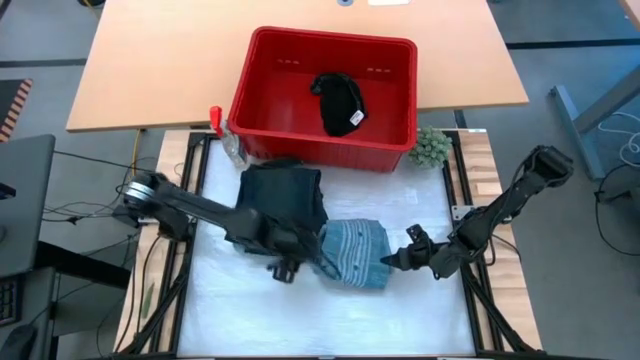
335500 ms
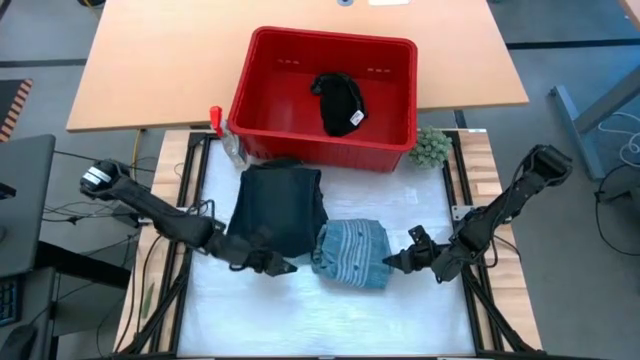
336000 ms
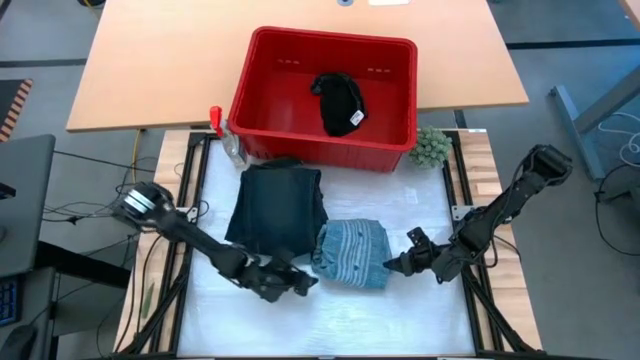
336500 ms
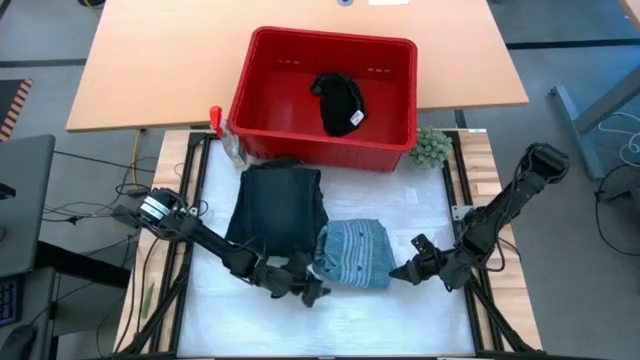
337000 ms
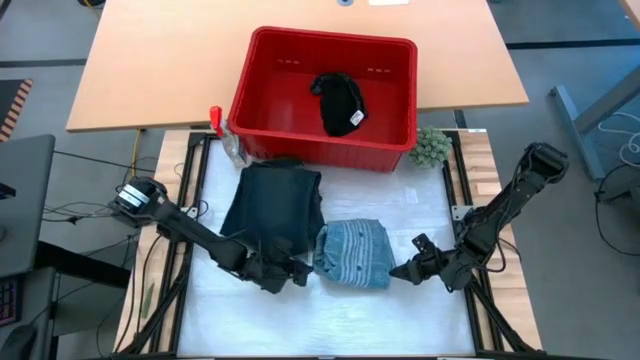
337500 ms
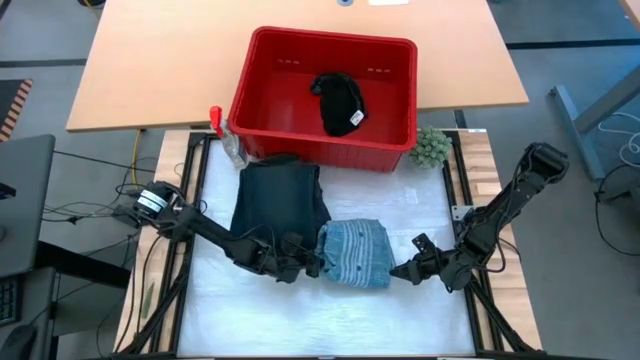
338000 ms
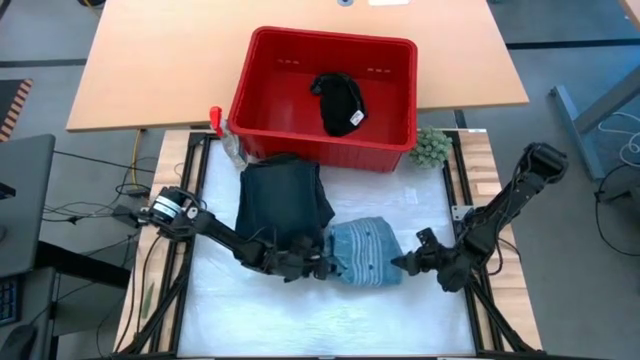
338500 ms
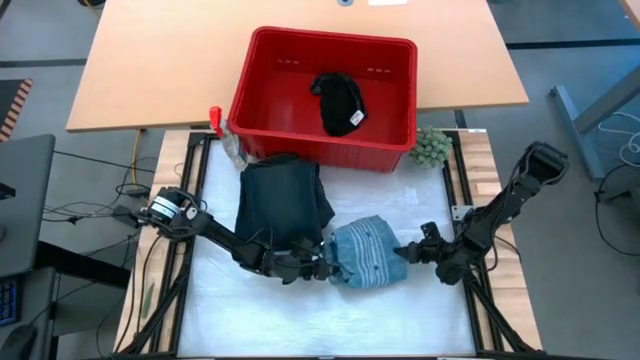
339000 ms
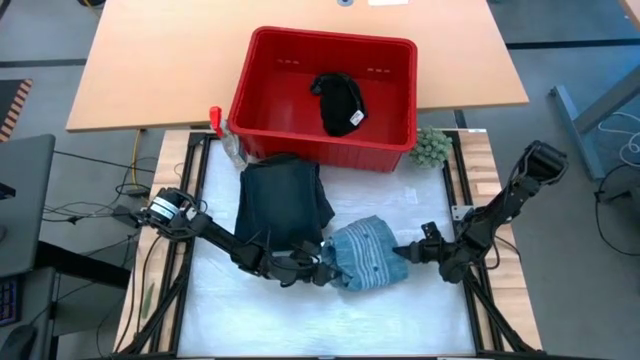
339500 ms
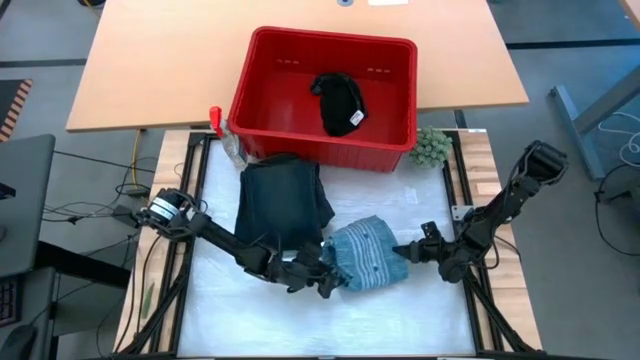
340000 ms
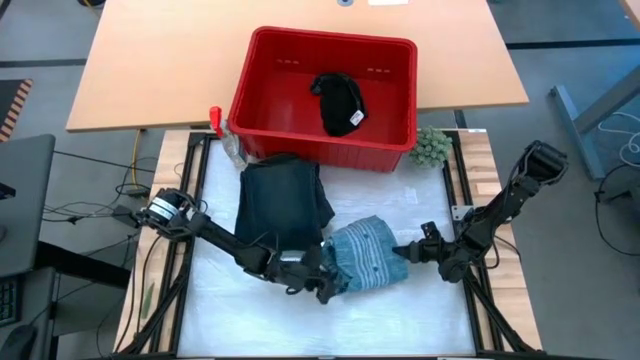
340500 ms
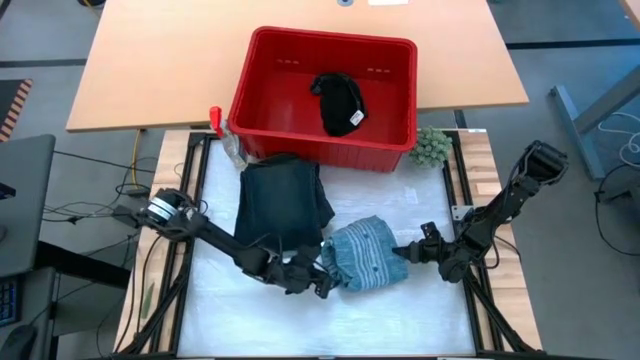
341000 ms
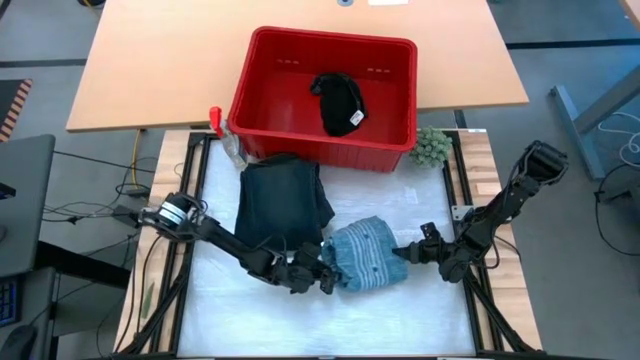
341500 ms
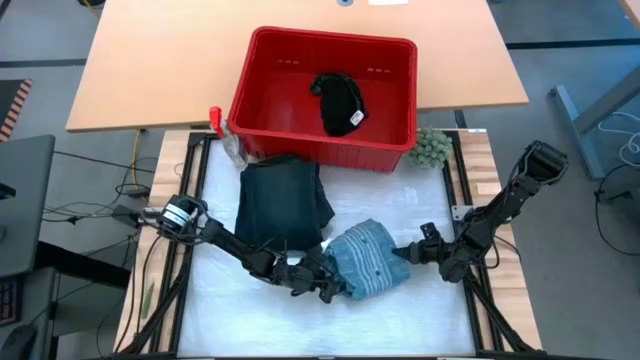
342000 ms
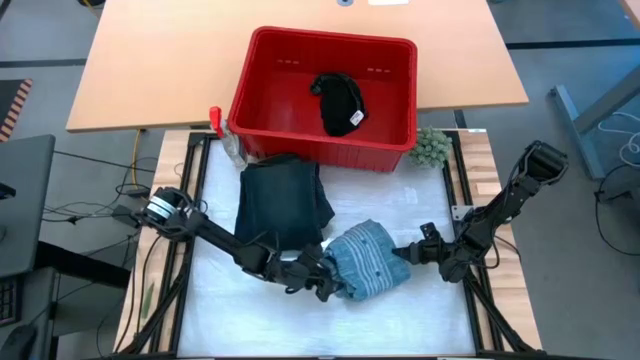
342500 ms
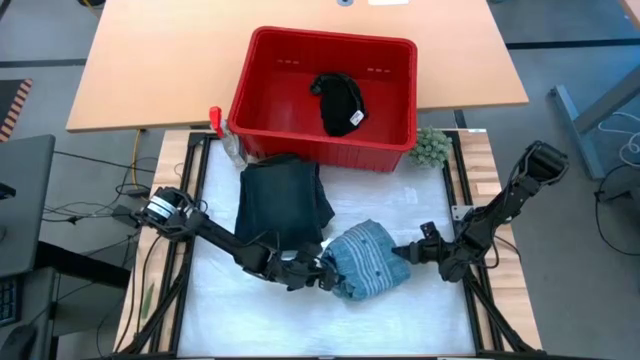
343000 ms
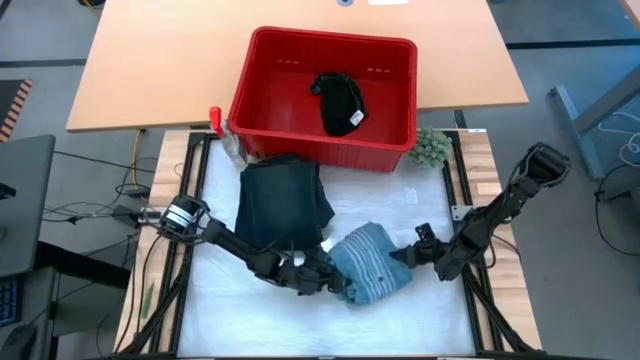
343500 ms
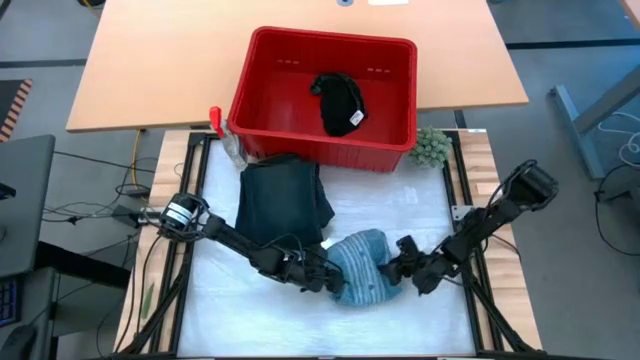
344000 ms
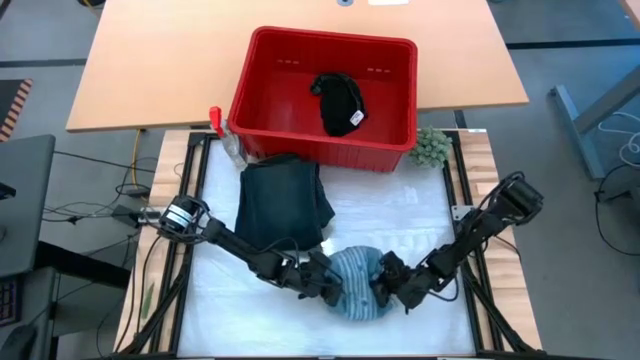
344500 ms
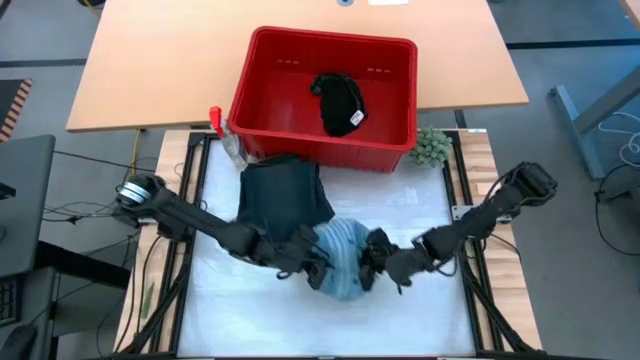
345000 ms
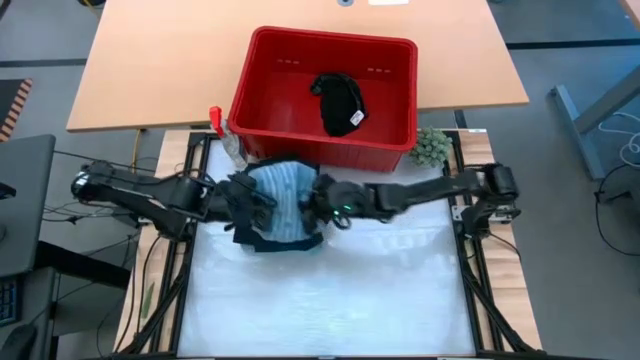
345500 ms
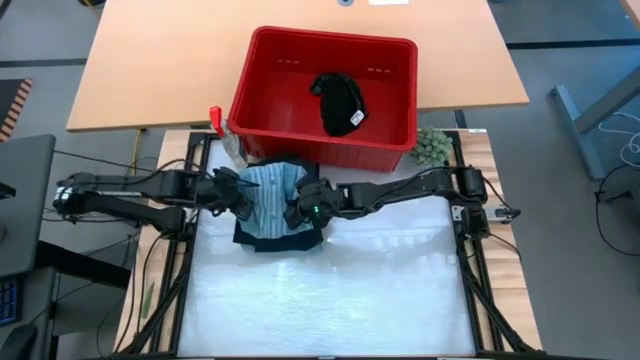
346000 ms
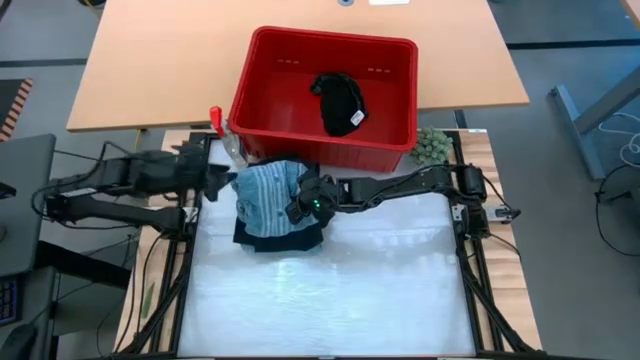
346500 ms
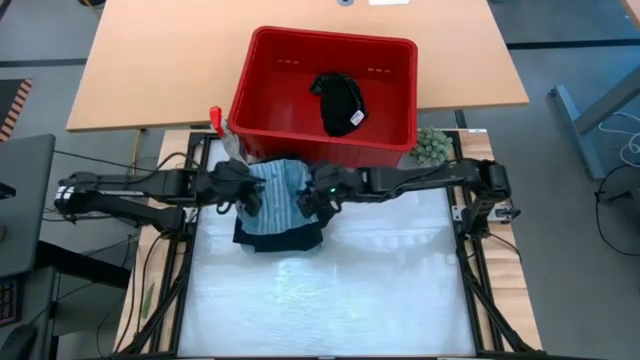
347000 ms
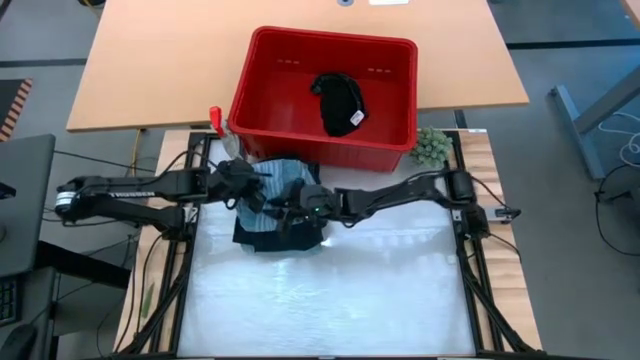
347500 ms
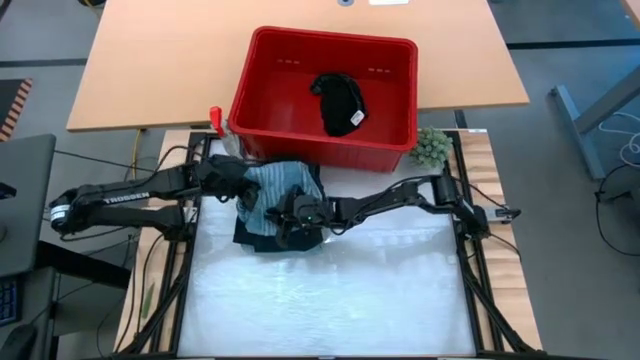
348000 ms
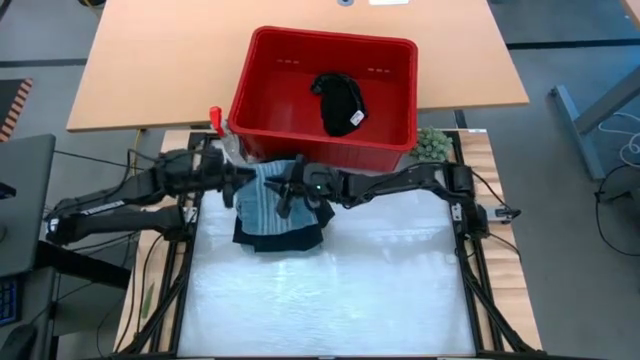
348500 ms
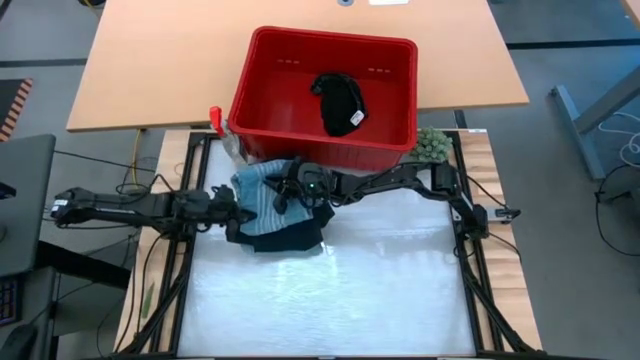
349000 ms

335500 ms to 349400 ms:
Task: Fold laundry
Stack the blue shirt on the black pants

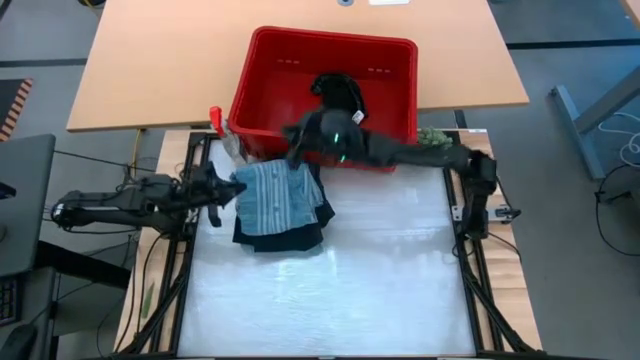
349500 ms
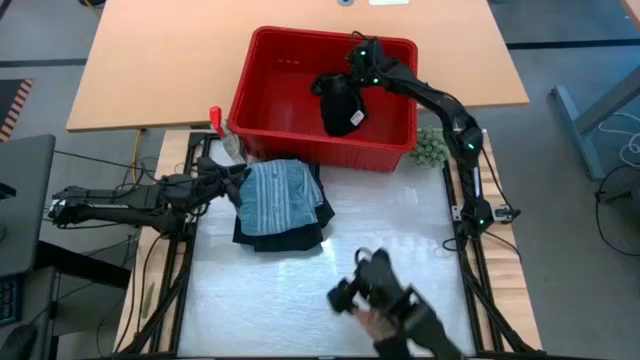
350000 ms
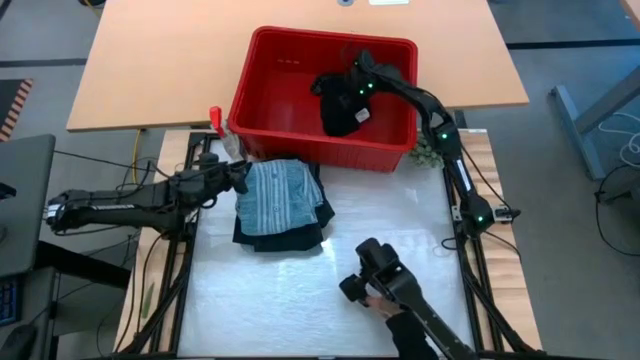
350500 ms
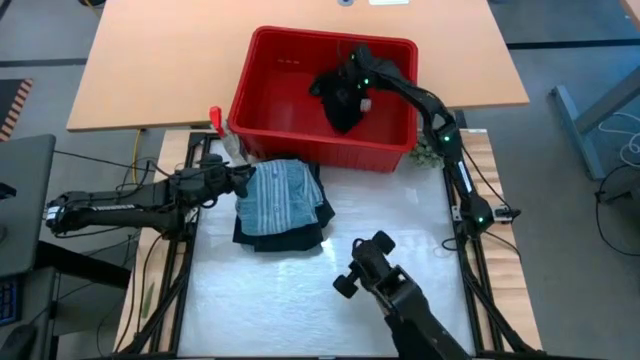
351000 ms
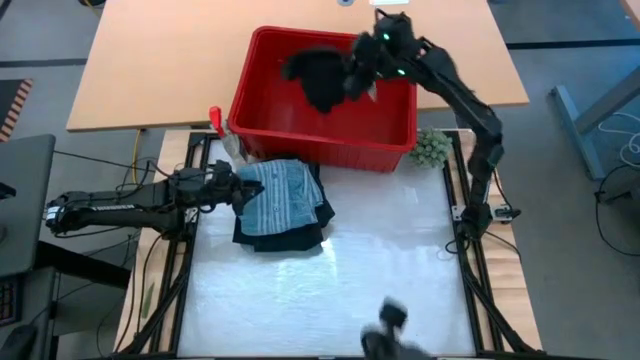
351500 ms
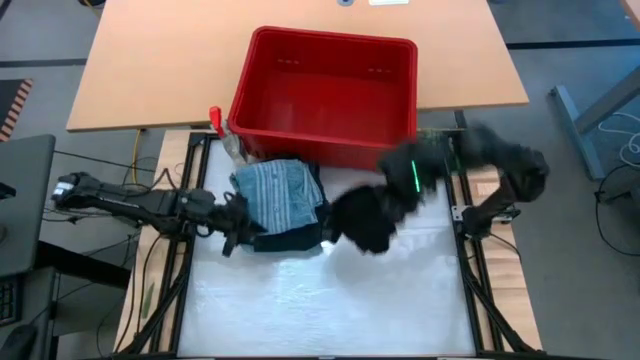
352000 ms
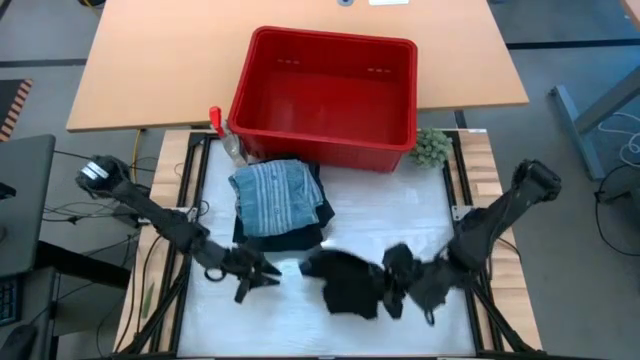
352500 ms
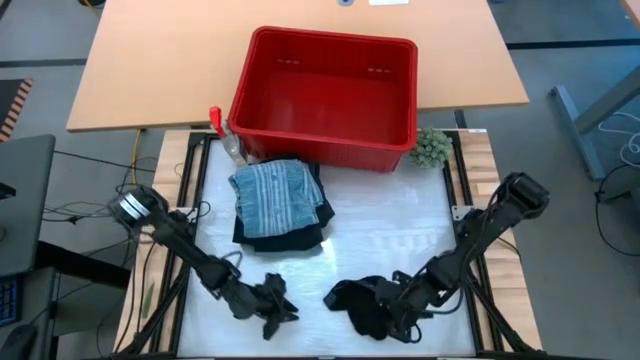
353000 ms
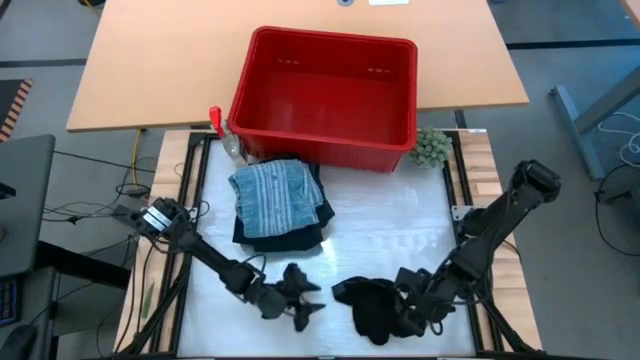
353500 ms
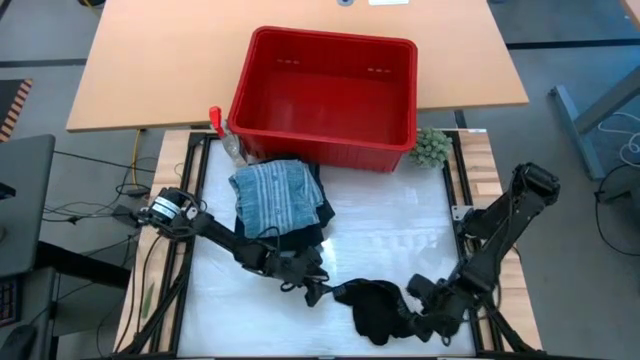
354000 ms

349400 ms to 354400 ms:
Fold the black boxer from the red laundry bin

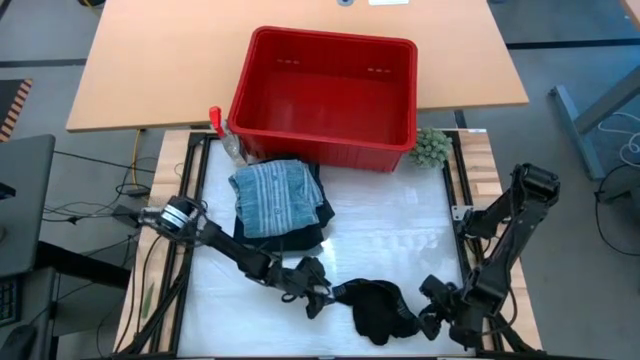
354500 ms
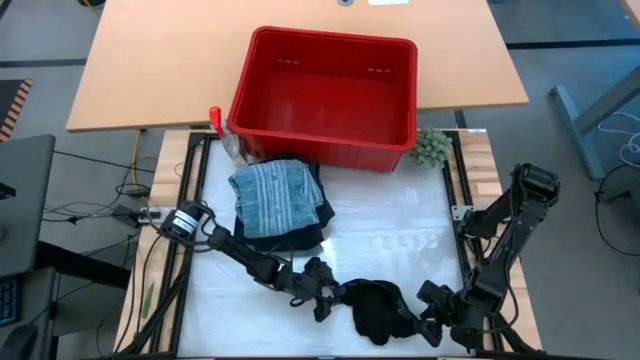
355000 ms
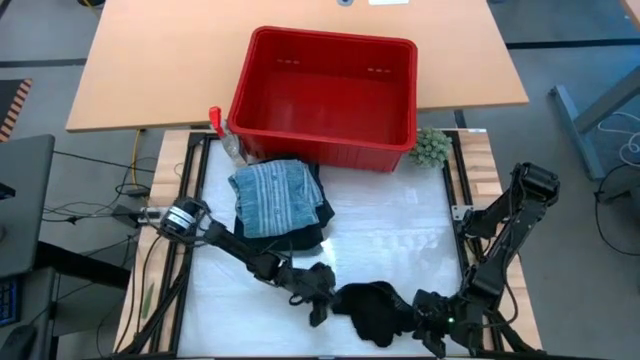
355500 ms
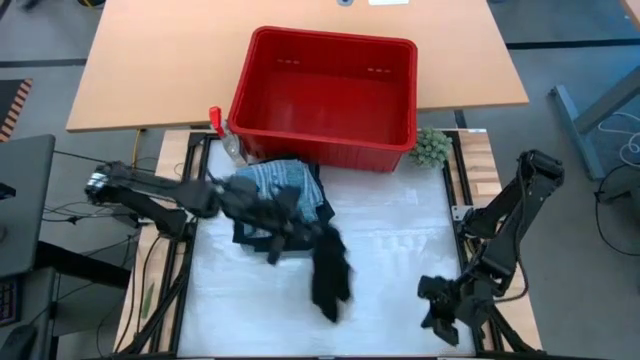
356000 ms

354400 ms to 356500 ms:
Fold the black boxer from the red laundry bin

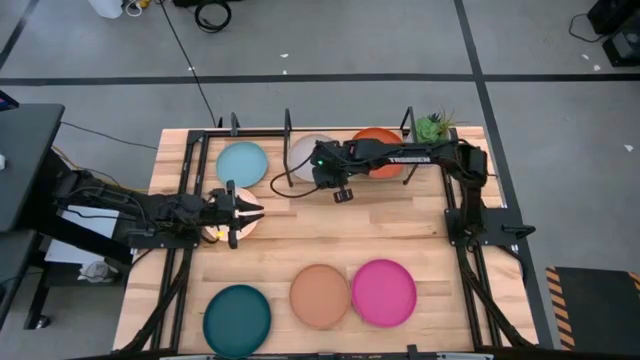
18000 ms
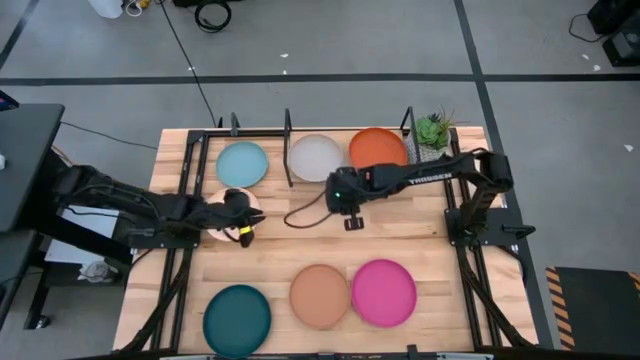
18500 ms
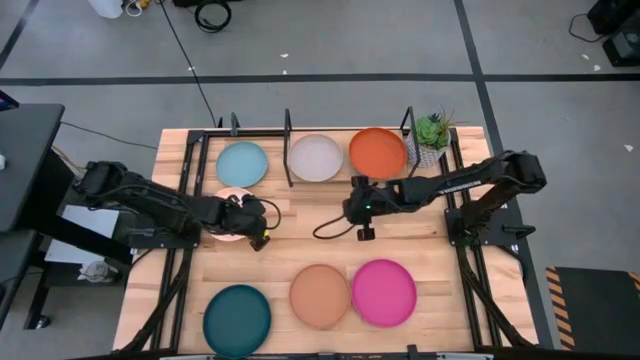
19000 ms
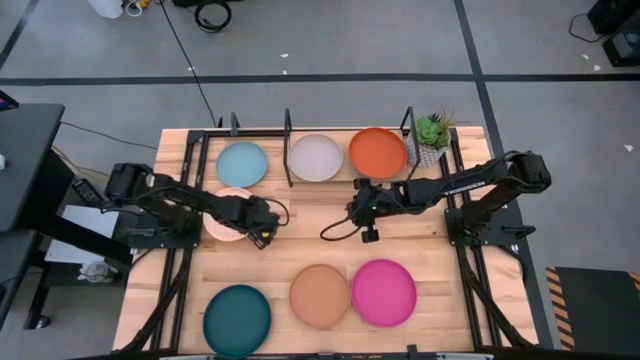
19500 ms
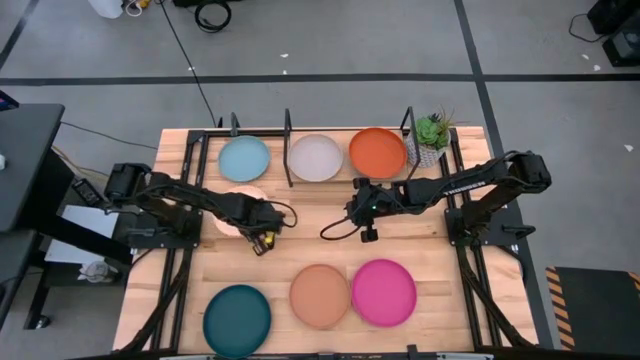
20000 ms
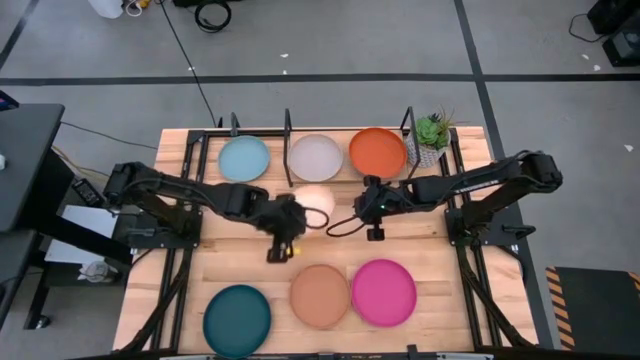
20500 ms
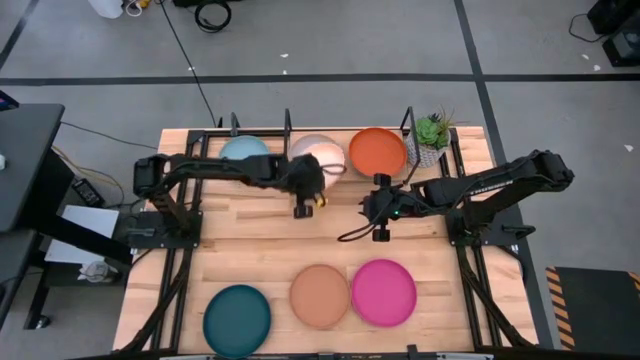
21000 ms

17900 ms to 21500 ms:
Task: Place and stack plates onto a shelf
Stack the light orange plate on top of the gray plate on the shelf
